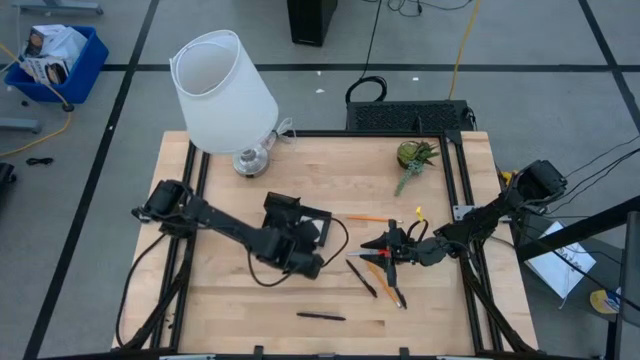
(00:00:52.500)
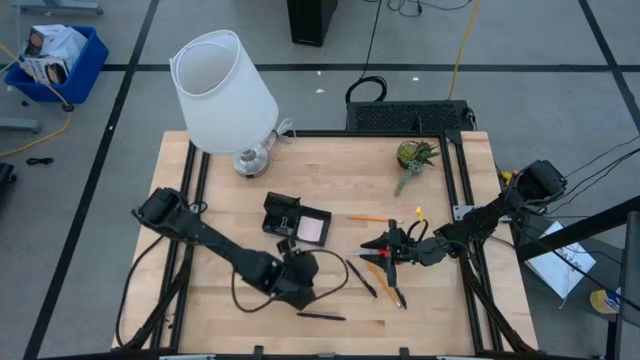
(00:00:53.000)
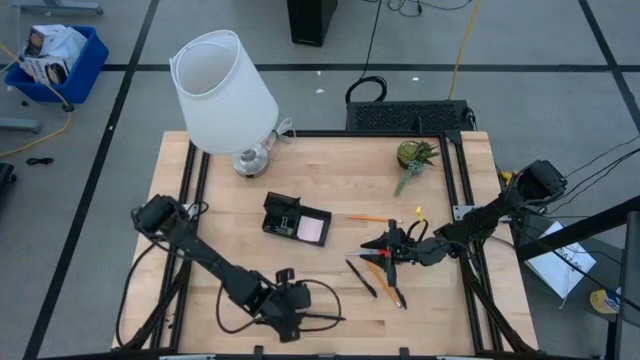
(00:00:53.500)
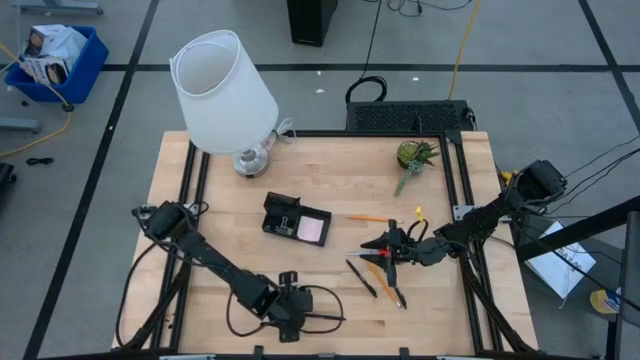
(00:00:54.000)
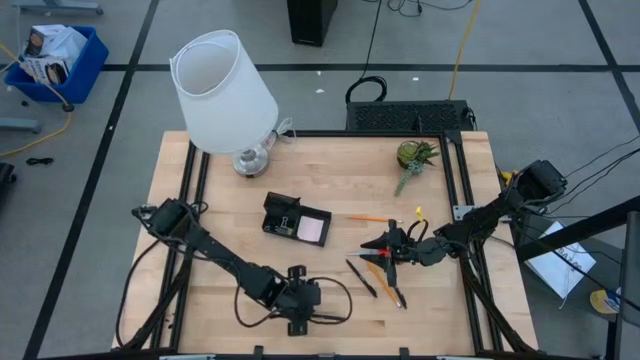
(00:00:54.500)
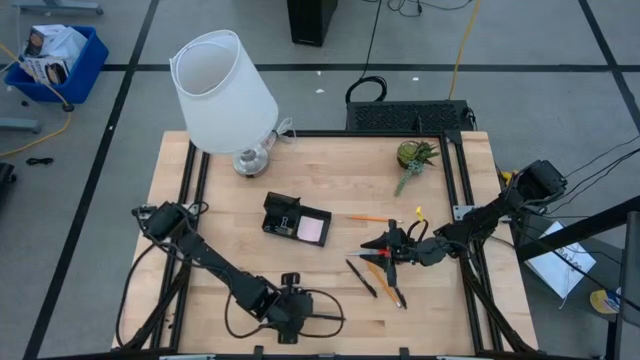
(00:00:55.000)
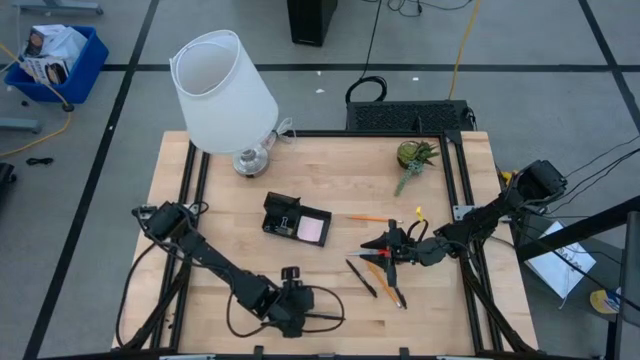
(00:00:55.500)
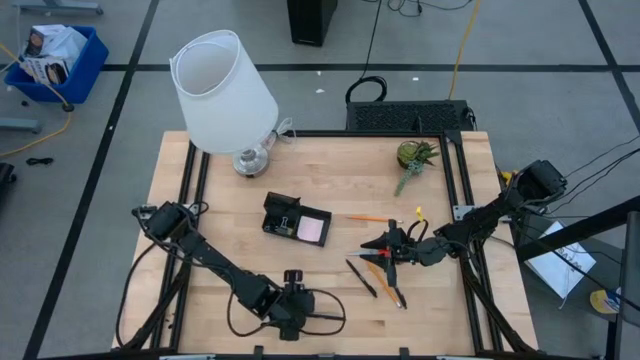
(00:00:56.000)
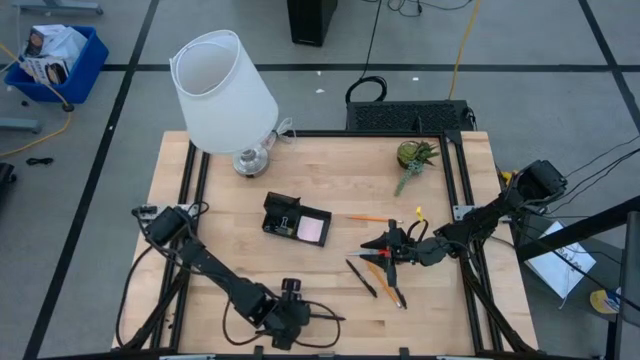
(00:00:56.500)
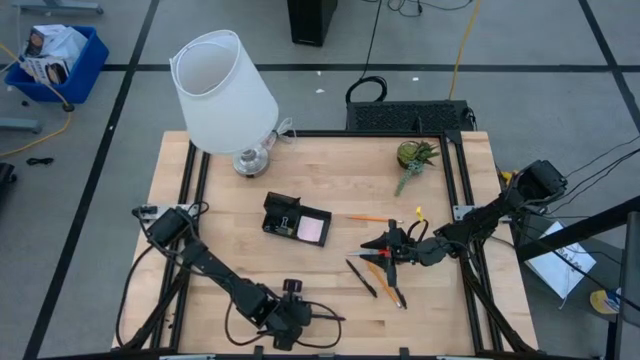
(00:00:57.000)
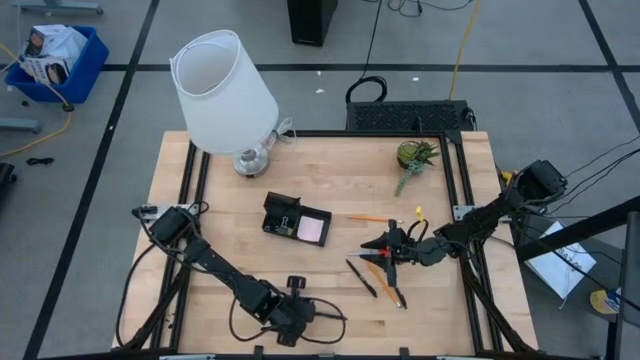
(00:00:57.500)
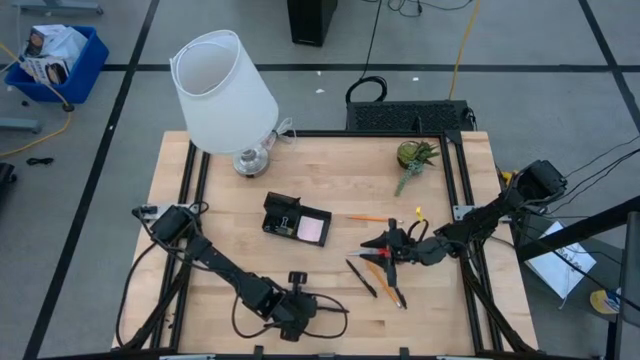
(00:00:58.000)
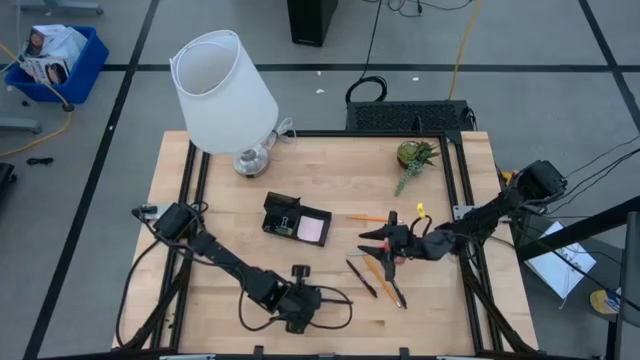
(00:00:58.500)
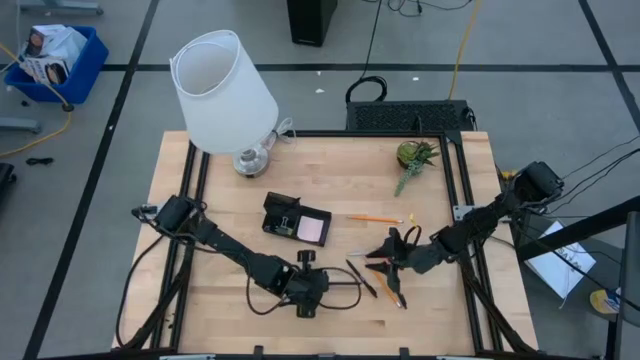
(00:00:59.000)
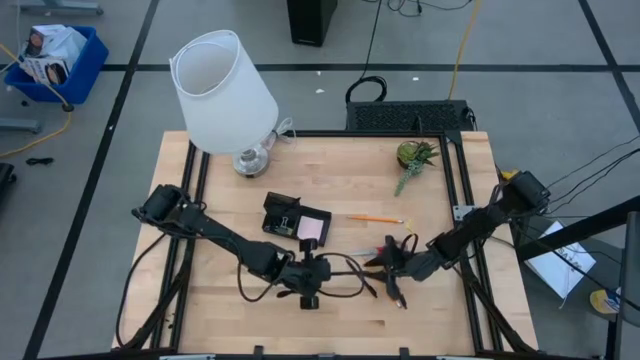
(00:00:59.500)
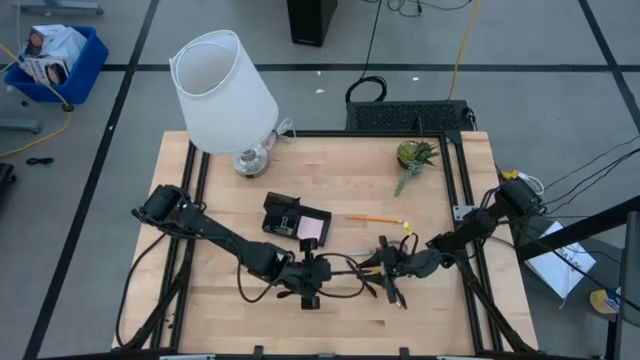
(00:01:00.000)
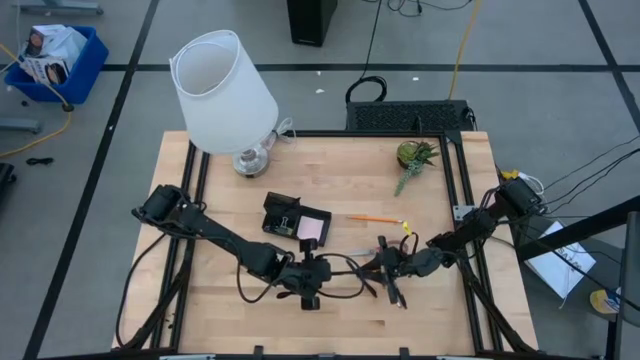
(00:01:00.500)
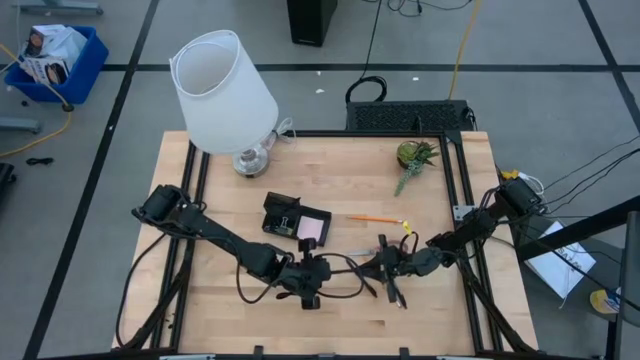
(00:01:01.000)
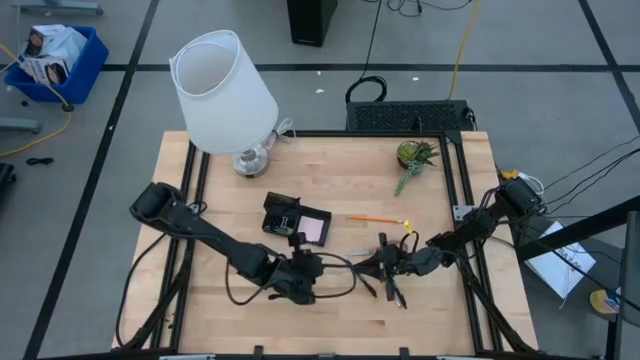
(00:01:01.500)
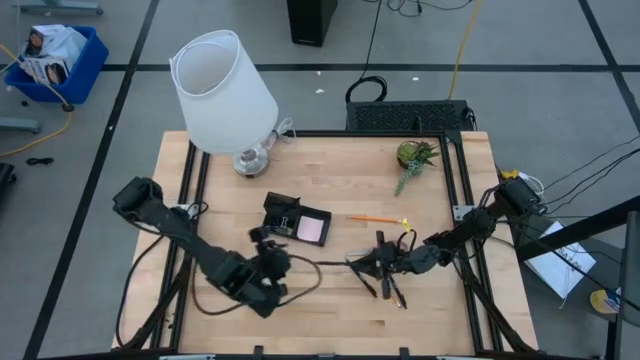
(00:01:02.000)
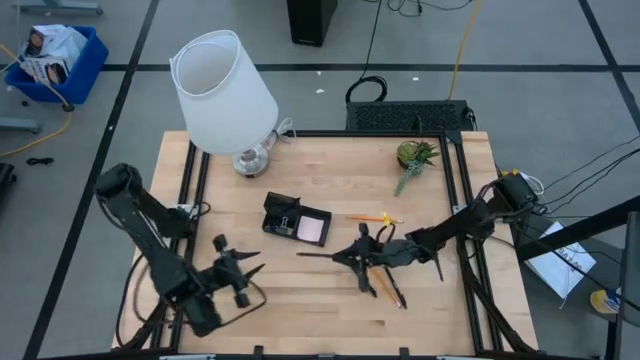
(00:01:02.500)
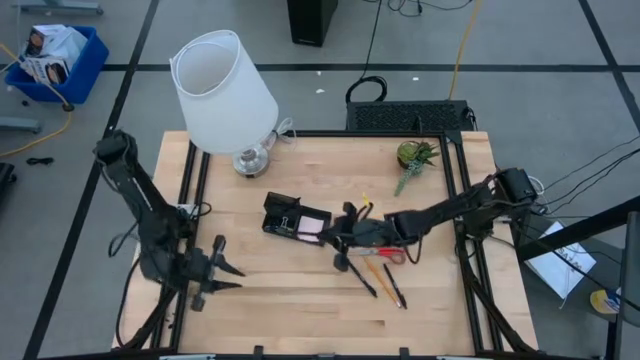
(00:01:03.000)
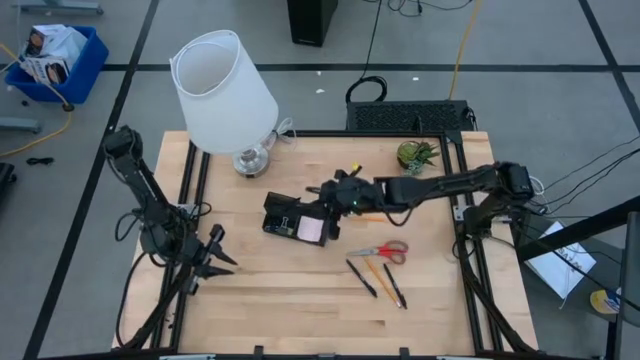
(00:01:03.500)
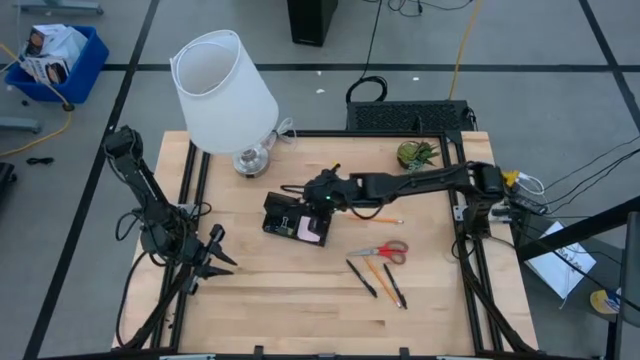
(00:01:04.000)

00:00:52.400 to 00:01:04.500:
Task: Pick and place office supplies into organizer
Put the black pen into the black desk organizer

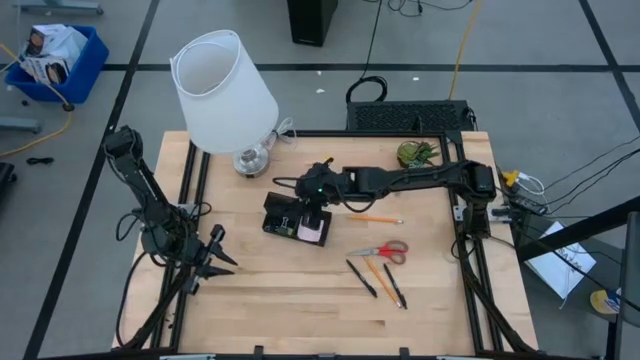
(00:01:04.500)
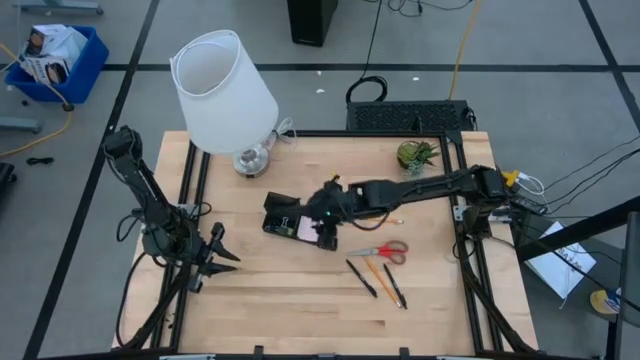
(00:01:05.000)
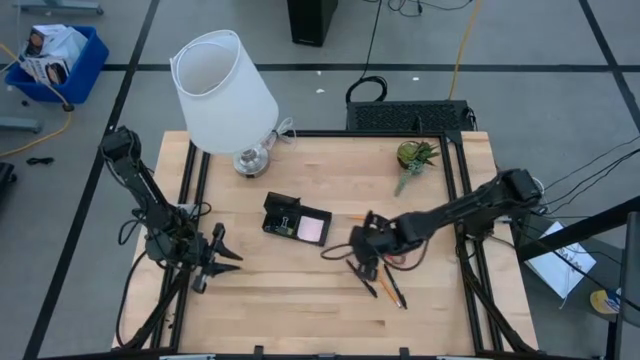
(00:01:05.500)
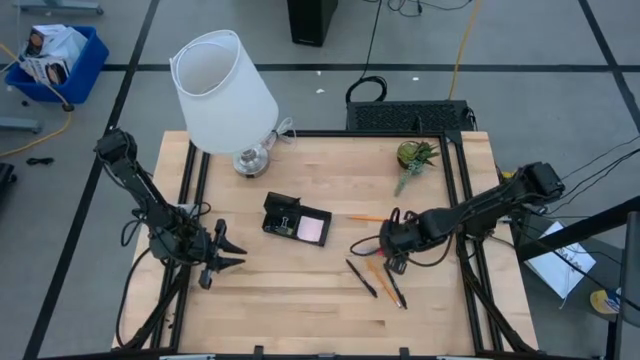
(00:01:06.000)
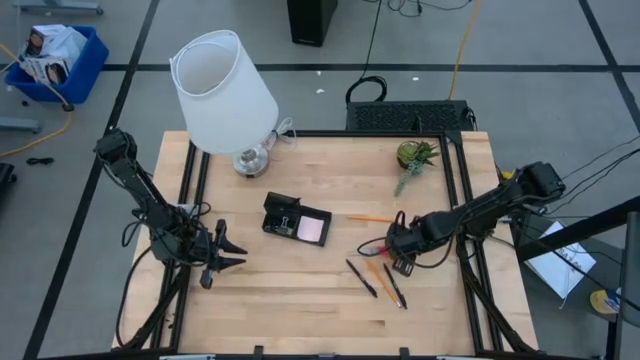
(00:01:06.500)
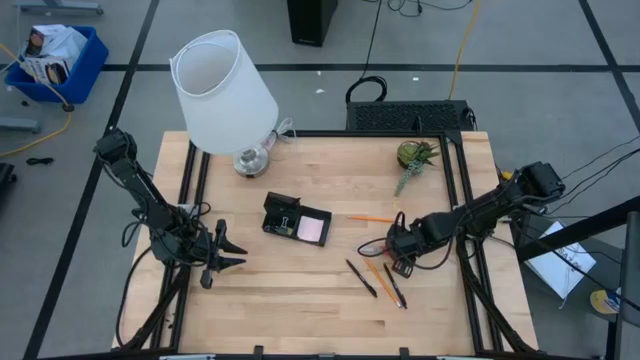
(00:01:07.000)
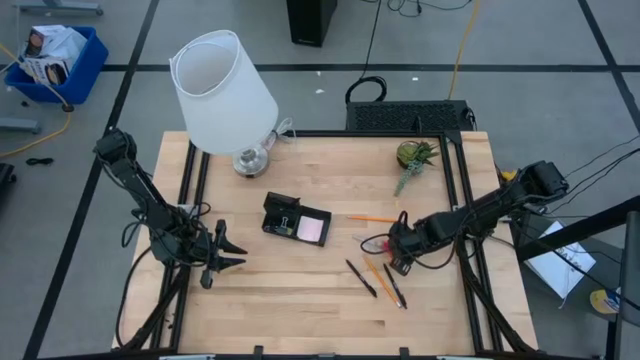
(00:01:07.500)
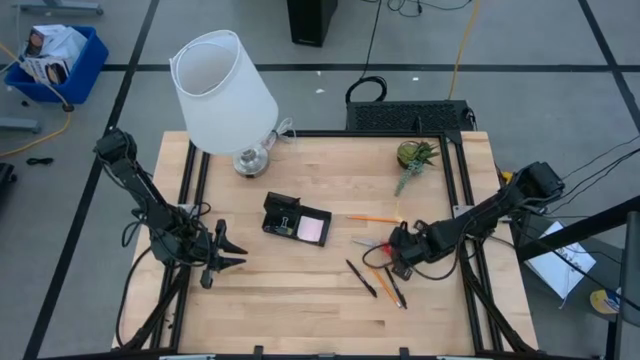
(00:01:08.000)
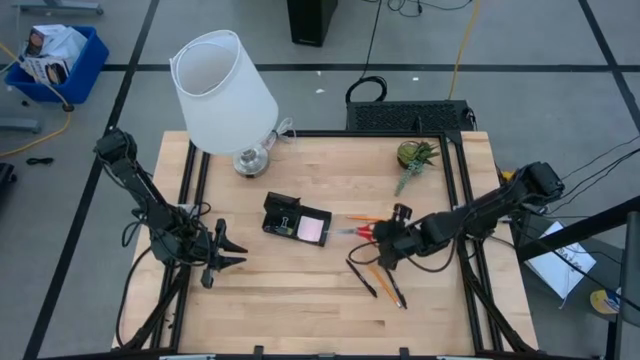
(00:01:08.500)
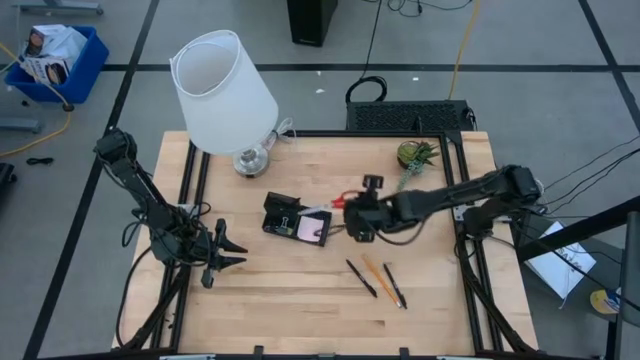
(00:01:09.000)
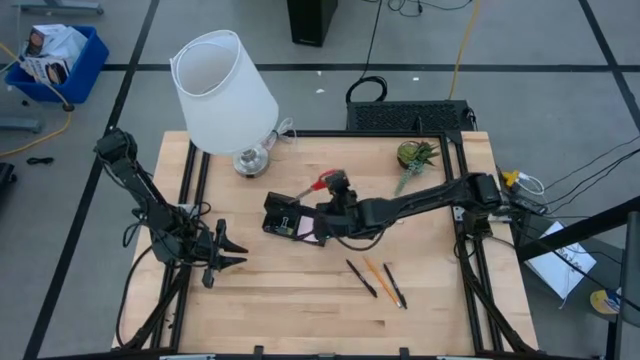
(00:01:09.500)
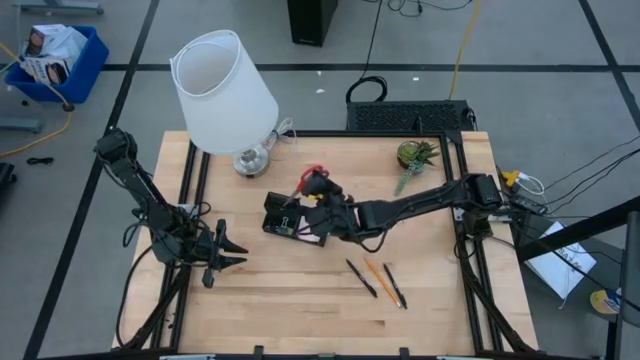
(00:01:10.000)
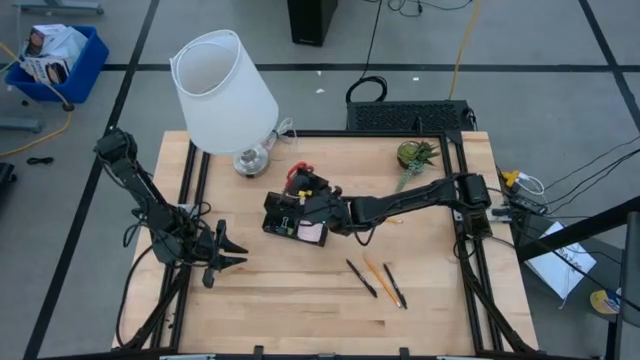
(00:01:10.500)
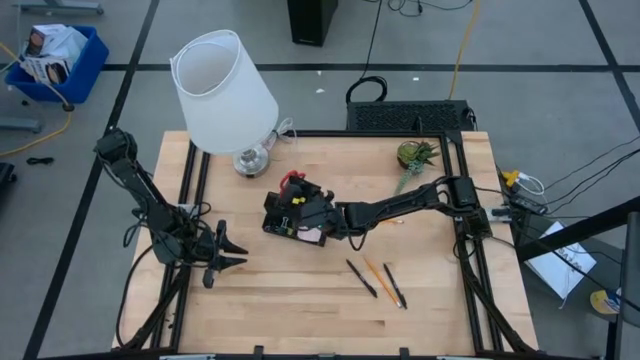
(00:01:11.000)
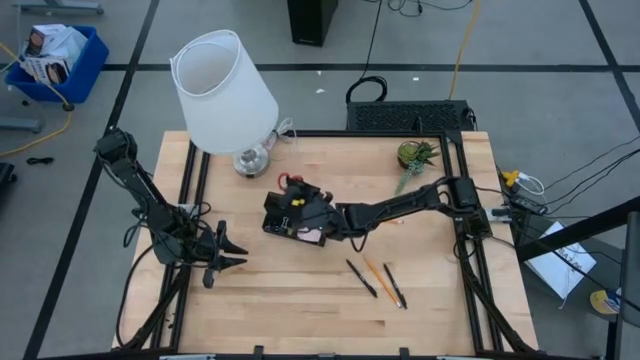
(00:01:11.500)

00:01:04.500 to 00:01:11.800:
Put the red scissors into the black desk organizer

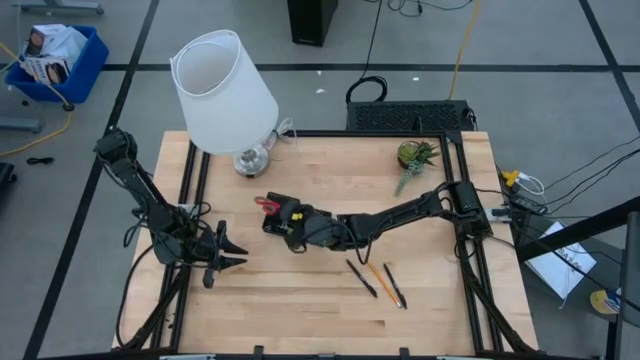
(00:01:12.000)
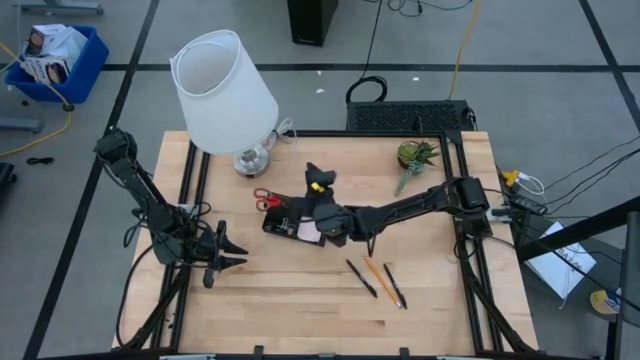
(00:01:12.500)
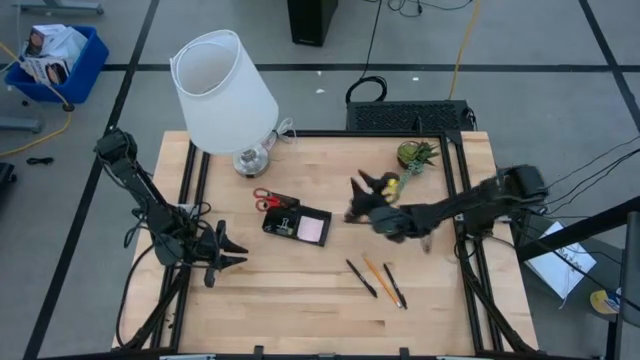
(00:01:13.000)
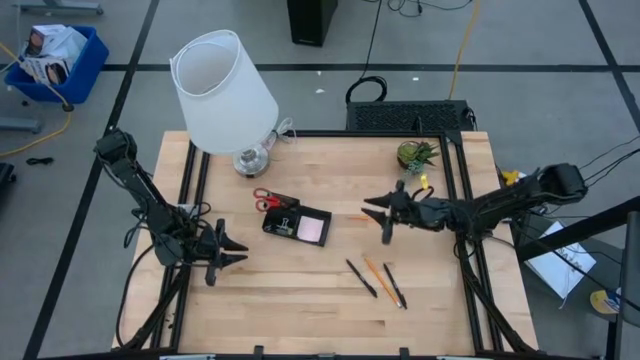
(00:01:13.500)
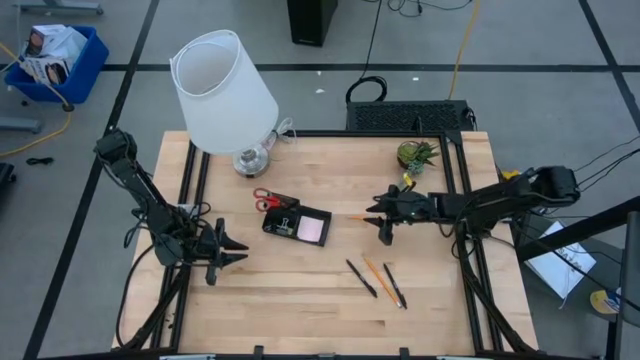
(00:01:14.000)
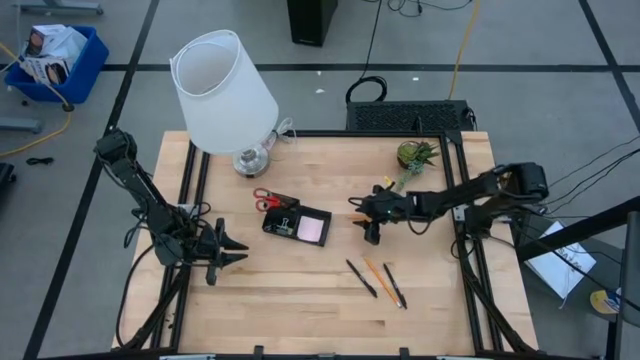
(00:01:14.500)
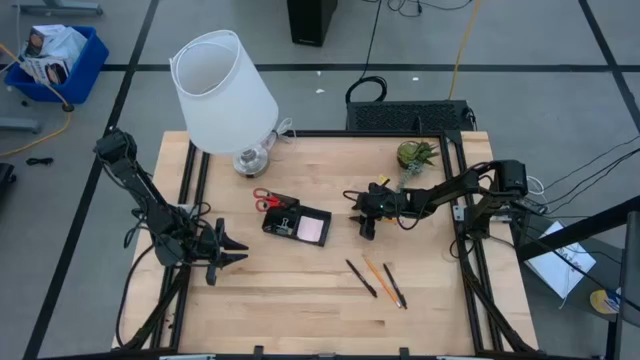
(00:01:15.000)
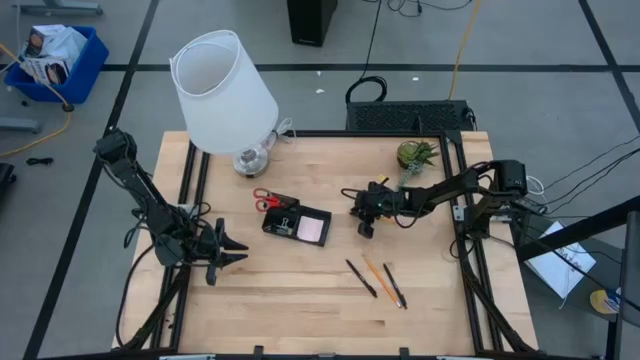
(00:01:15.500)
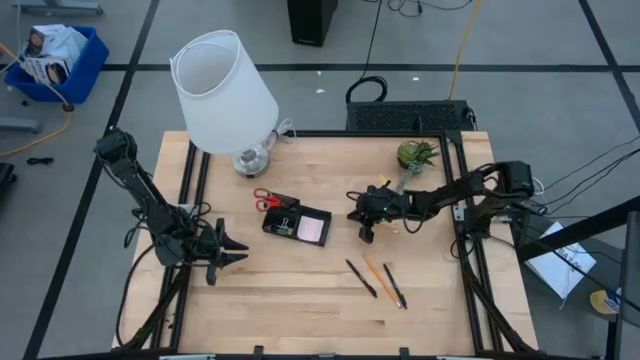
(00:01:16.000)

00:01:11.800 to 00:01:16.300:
Put the top orange pencil into the black desk organizer
